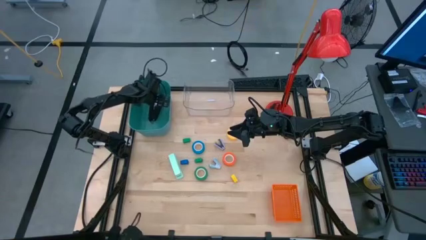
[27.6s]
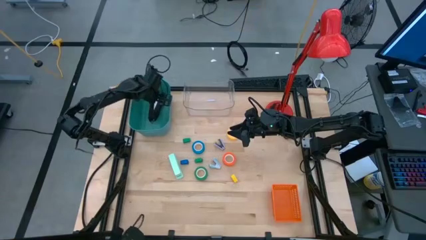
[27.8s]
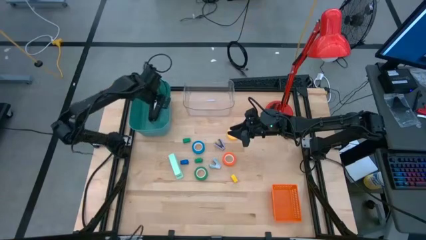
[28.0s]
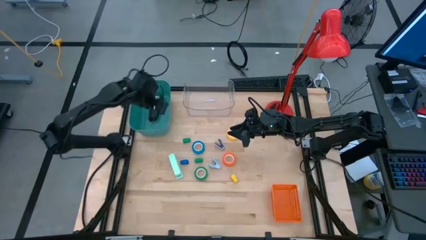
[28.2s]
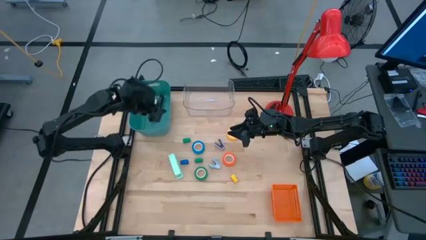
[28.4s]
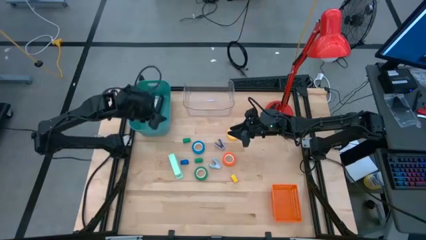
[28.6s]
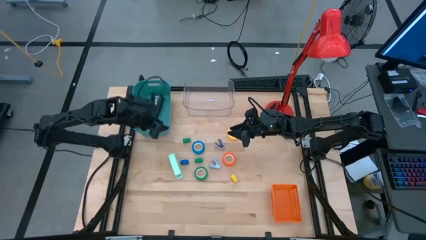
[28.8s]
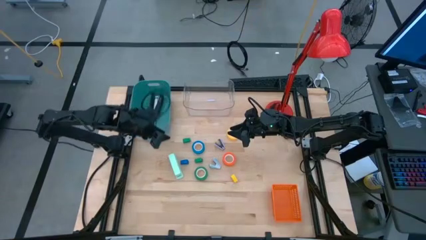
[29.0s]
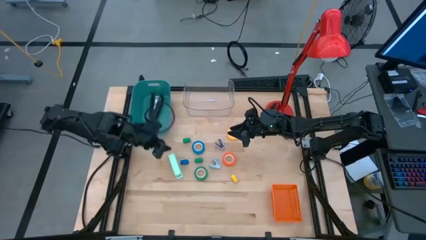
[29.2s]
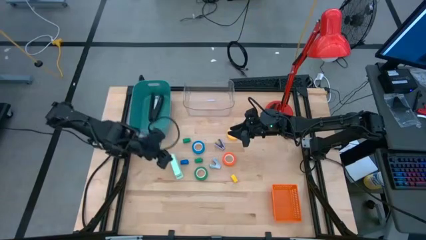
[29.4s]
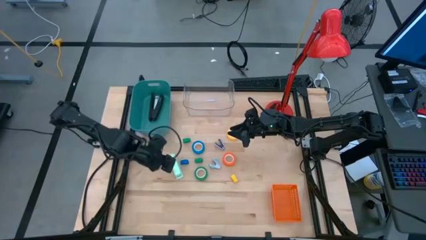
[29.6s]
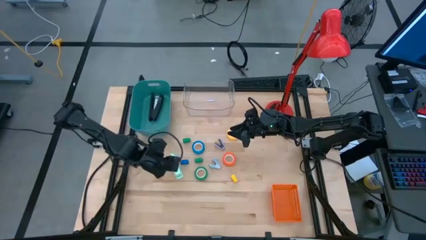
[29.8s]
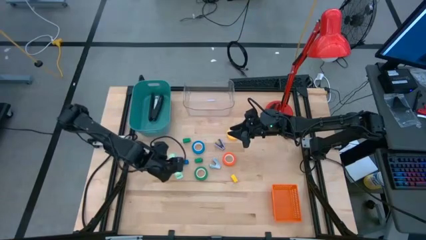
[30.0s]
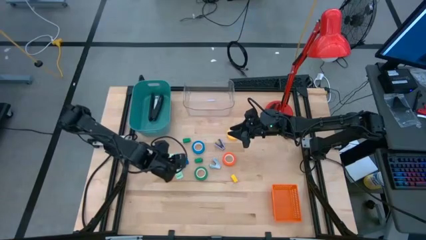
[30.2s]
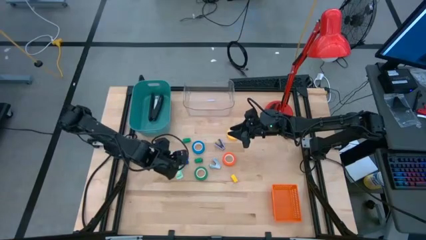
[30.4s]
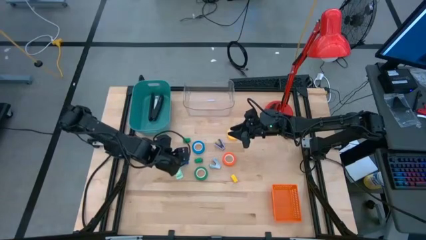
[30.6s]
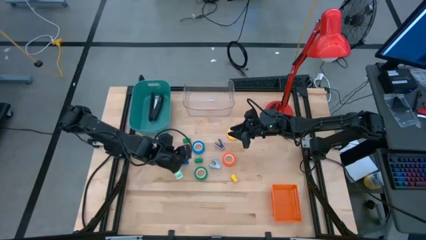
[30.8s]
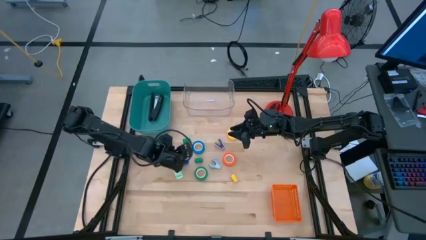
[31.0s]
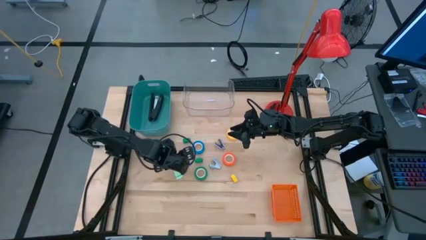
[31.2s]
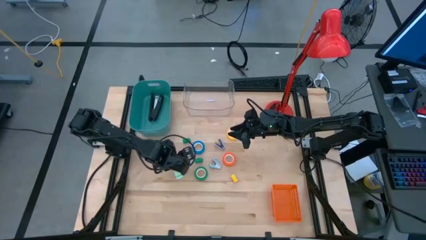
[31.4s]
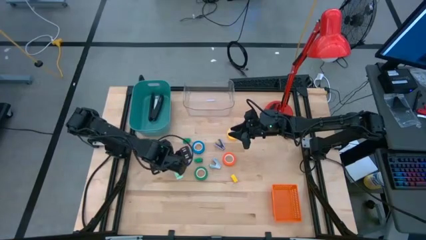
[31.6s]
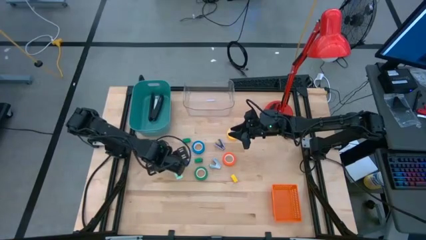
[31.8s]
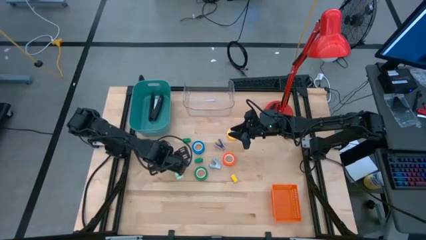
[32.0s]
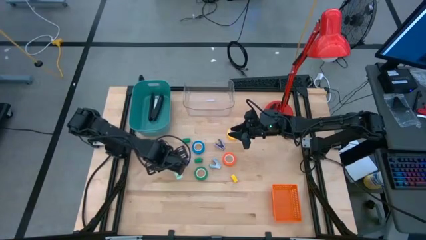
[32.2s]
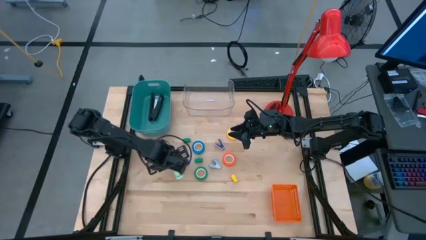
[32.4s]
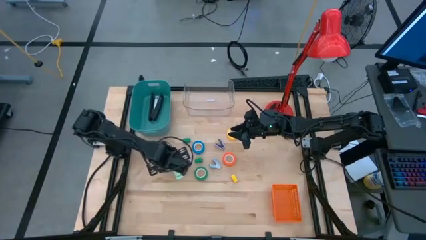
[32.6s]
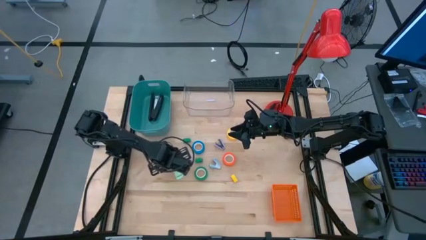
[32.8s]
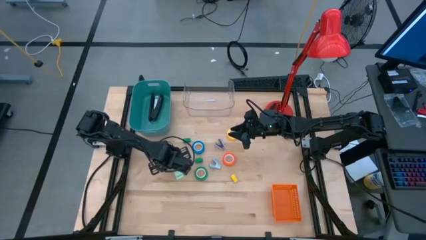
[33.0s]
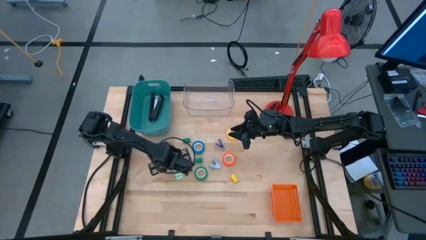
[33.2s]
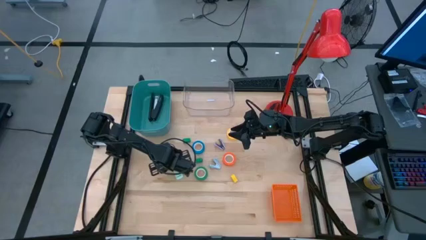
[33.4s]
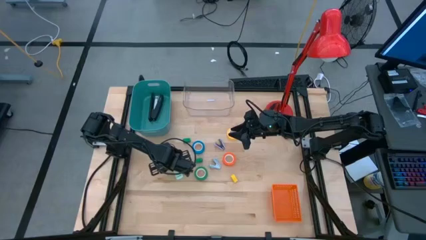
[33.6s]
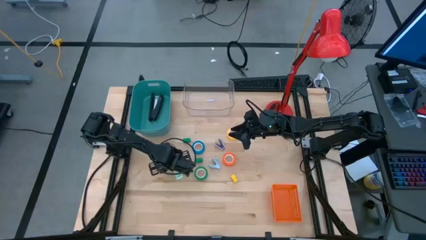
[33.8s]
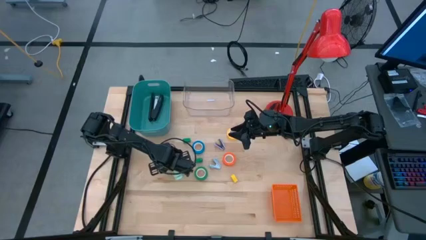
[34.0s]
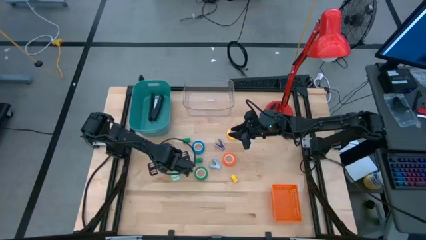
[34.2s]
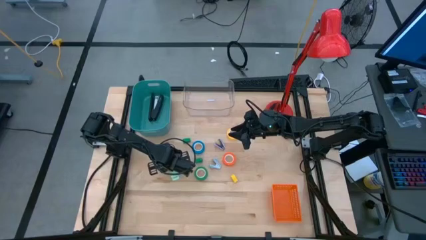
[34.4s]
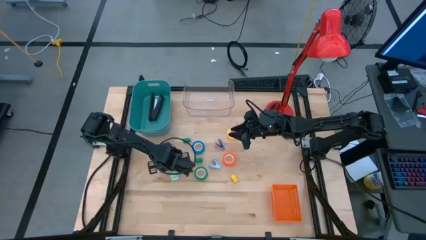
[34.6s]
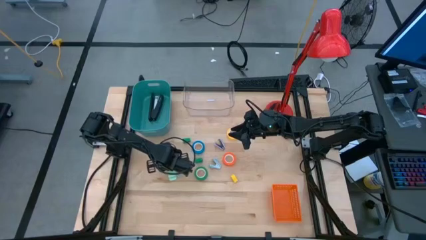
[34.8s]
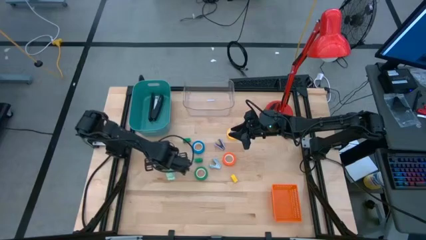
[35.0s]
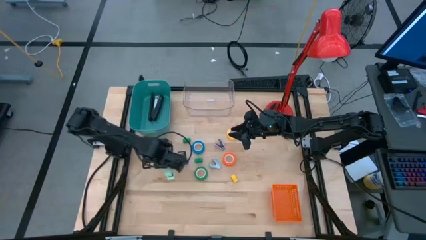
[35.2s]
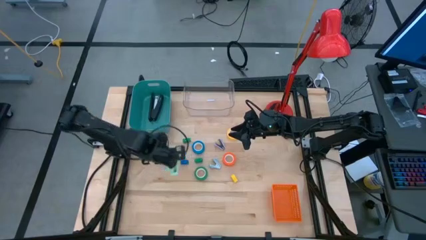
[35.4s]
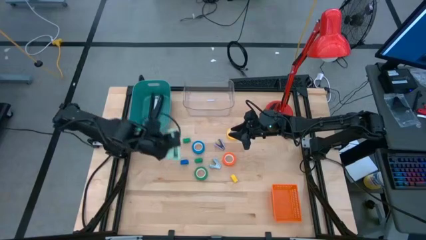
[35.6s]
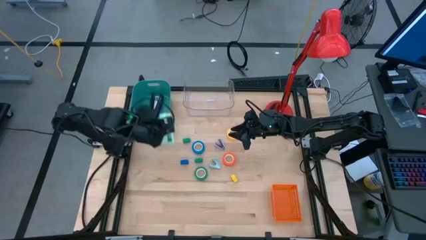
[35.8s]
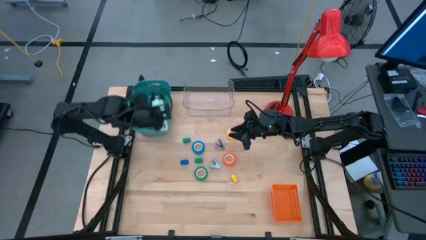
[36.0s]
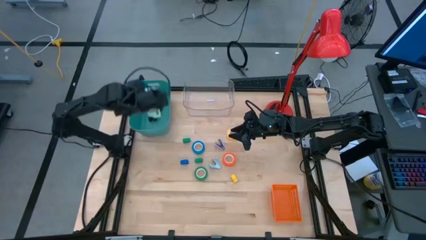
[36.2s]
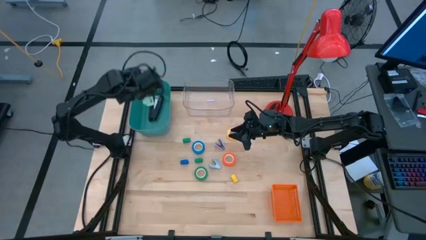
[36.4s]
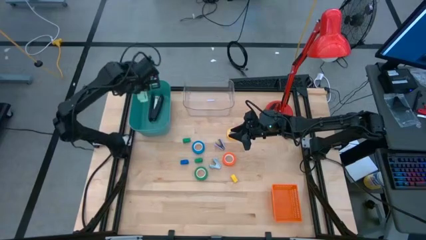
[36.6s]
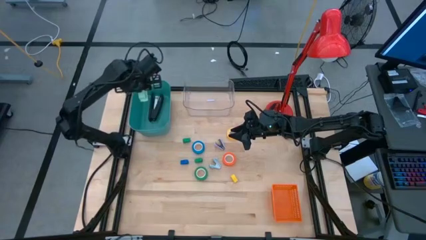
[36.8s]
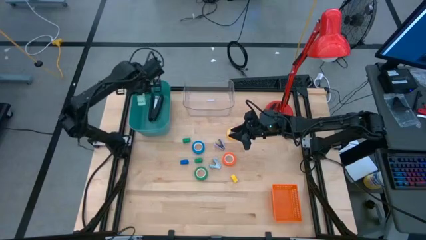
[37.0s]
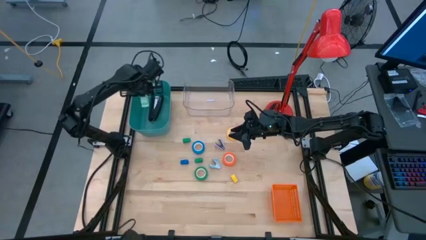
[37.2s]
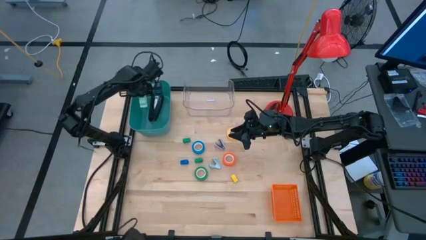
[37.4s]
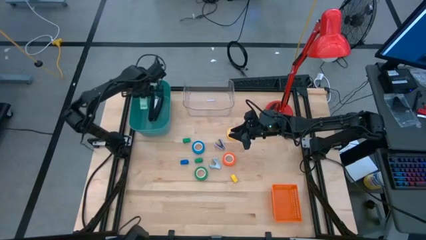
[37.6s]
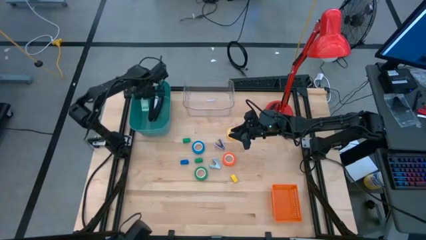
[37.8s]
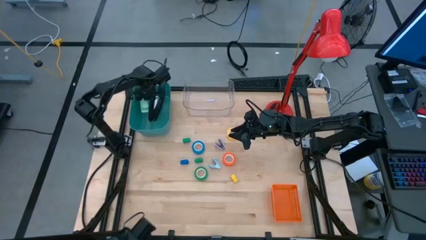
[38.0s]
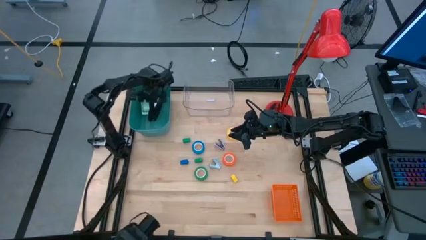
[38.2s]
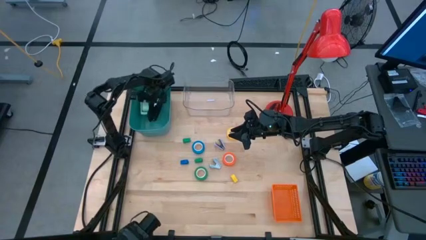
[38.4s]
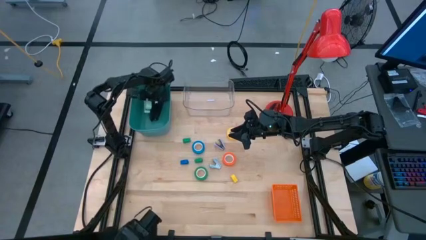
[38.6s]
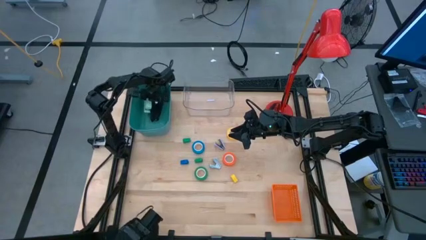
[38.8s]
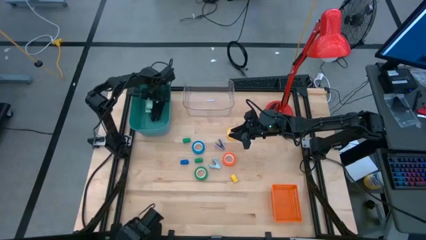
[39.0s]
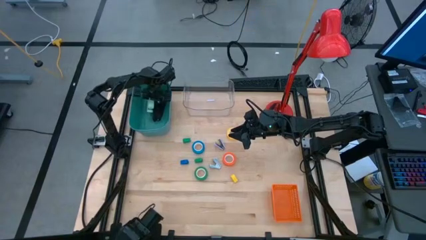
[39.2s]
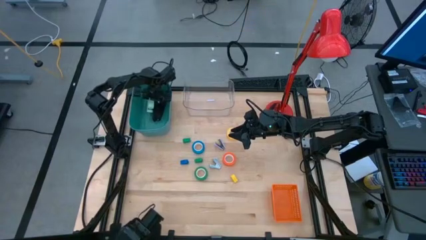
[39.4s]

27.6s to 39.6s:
Task: Pick and place Stapler, Stapler remover, tape
Put the light green stapler into the green bin
